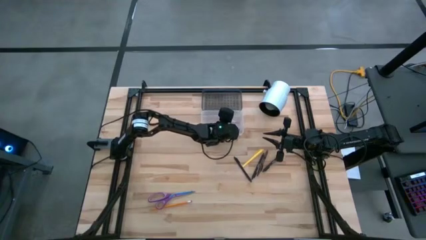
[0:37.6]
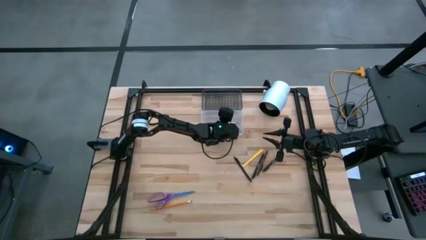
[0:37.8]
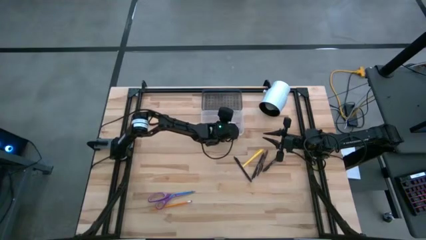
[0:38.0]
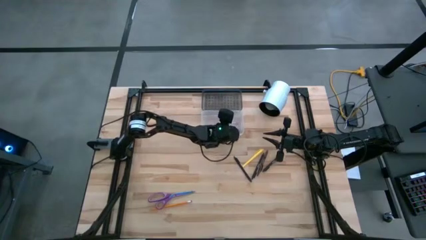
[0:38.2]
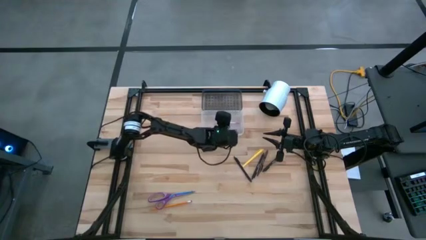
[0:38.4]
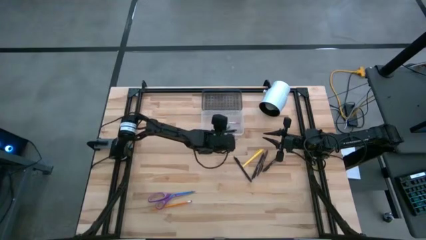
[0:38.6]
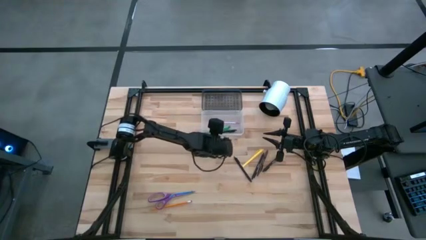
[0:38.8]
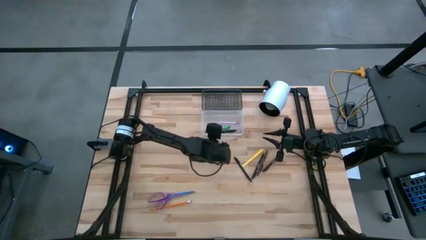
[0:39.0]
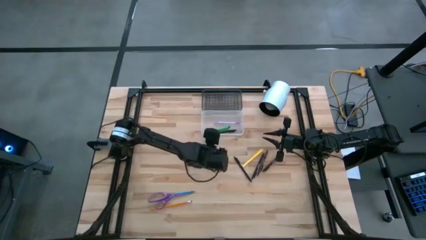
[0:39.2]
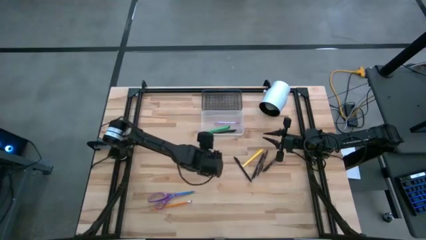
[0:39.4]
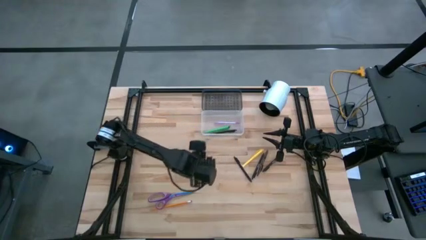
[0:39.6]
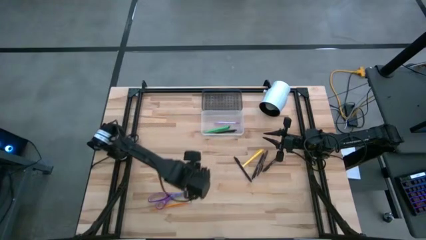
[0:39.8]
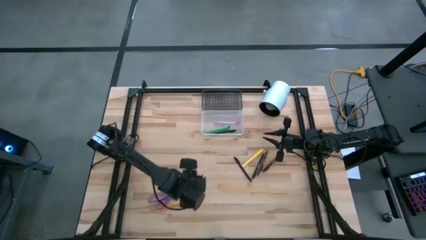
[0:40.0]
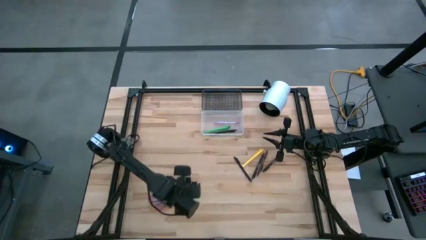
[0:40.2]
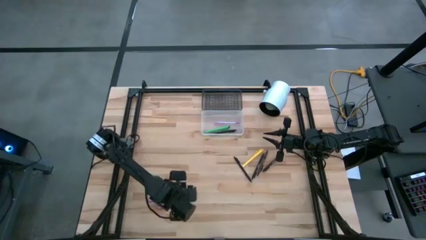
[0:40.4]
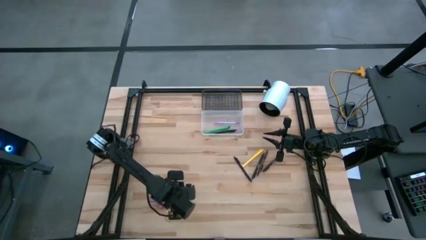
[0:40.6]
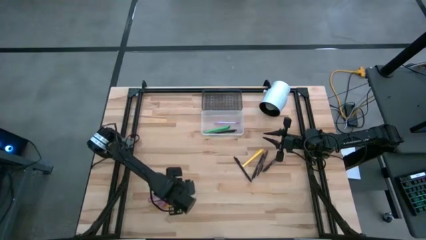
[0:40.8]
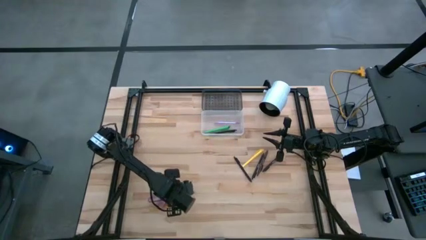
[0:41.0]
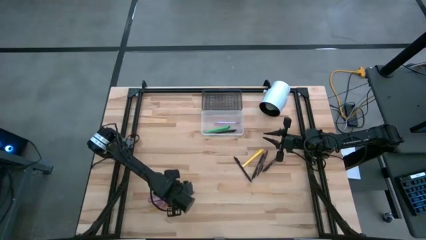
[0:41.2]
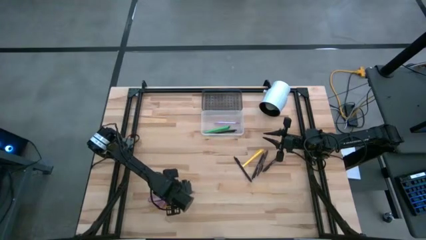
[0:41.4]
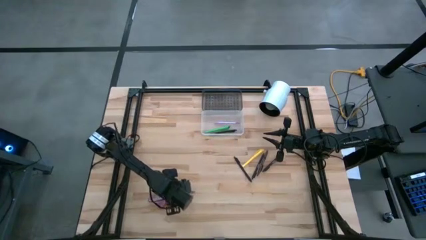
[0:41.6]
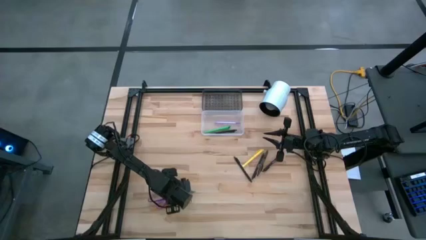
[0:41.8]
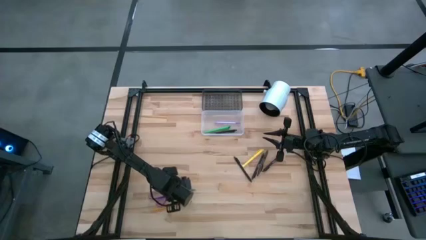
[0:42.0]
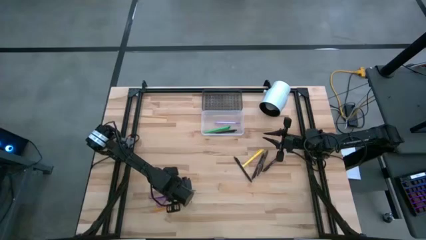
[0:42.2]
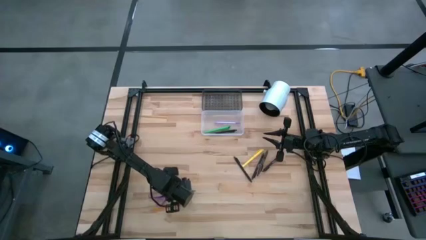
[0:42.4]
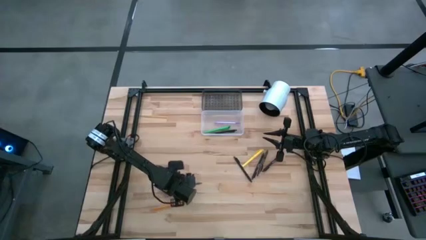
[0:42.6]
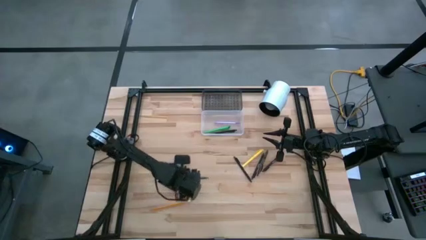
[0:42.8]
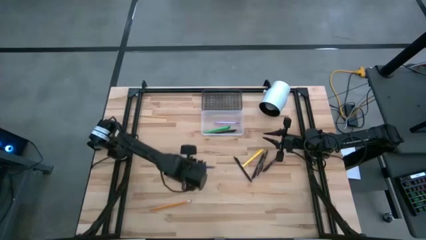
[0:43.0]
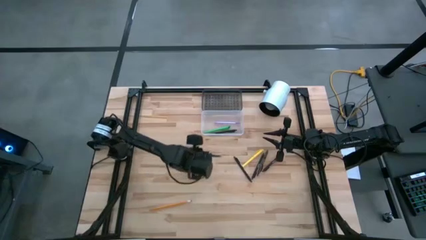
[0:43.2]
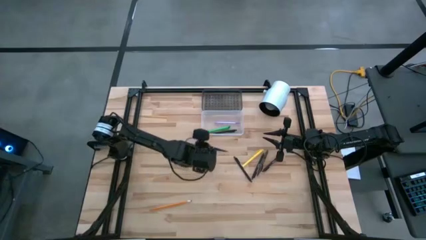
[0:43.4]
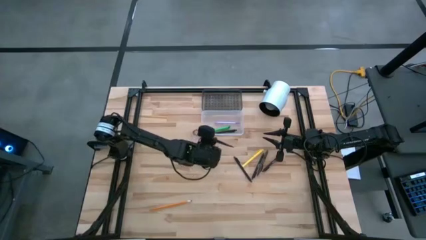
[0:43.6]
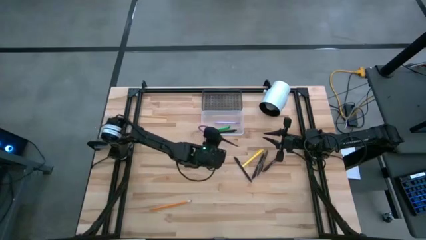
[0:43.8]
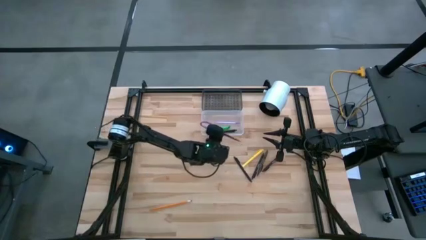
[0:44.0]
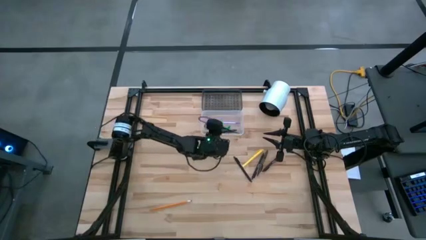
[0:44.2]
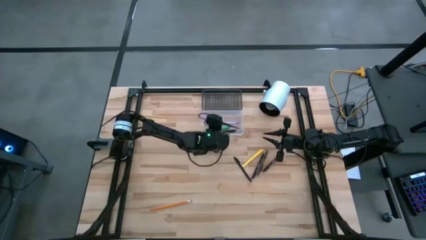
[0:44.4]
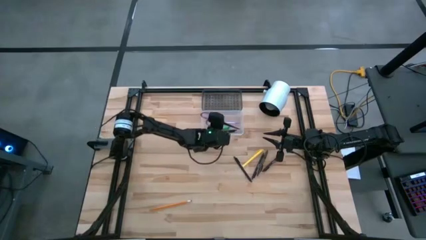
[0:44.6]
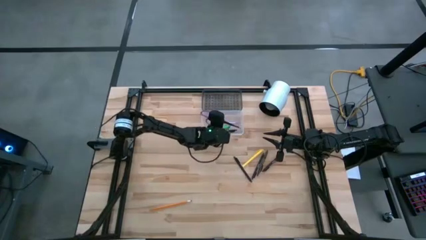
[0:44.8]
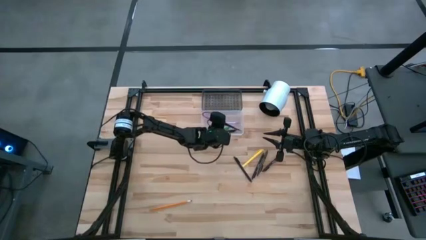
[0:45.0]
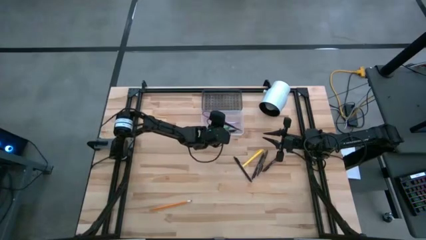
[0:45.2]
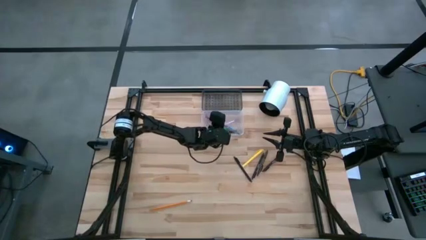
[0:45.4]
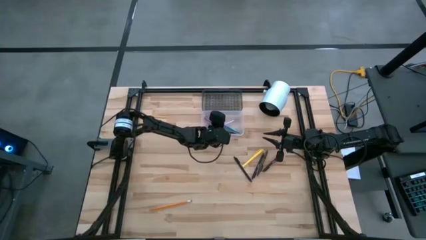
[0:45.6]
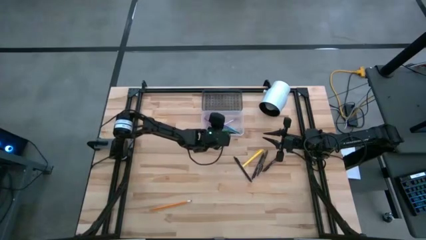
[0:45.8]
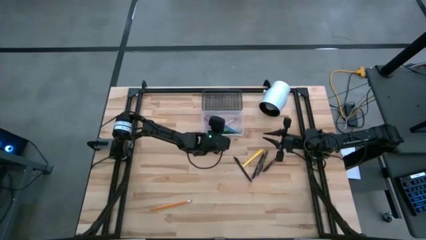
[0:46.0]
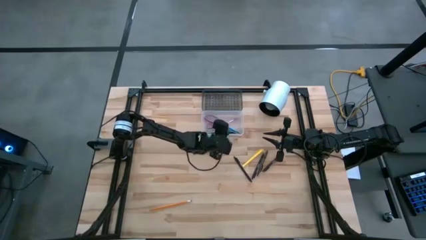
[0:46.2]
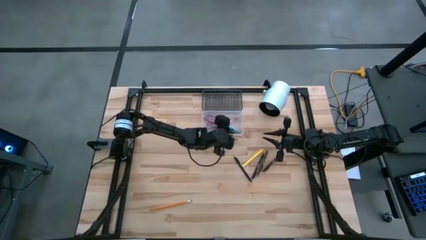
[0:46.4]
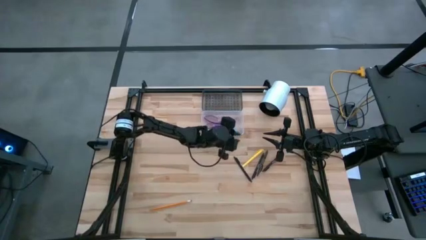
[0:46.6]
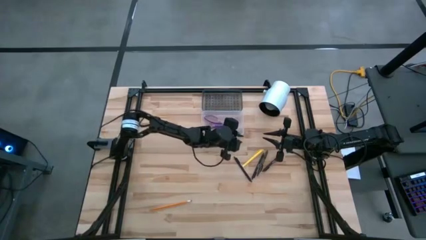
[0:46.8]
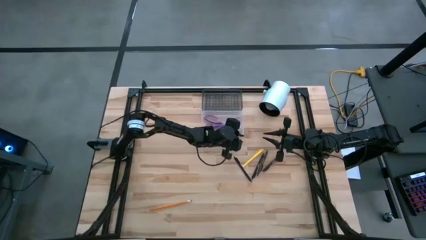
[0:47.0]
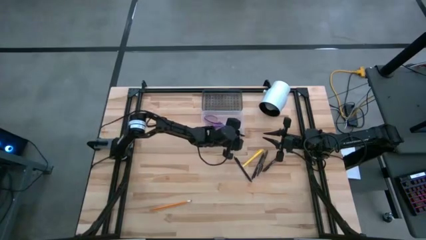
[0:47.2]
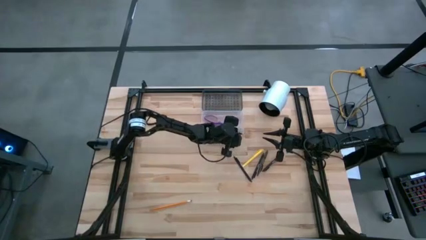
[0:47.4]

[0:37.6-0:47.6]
Task: Pick & place school supplies into a supply box
Put the purple scissors into the black box

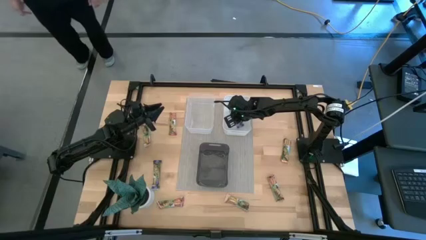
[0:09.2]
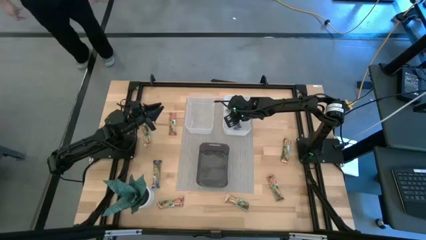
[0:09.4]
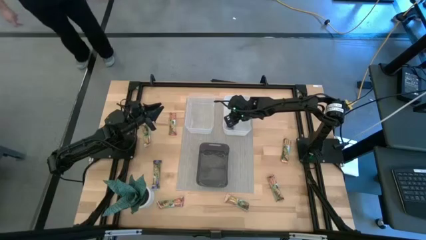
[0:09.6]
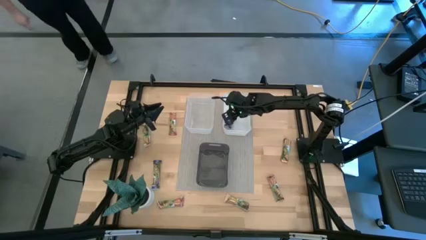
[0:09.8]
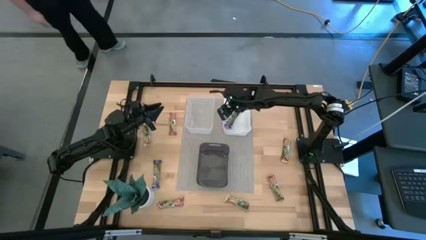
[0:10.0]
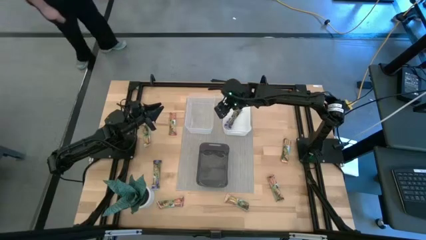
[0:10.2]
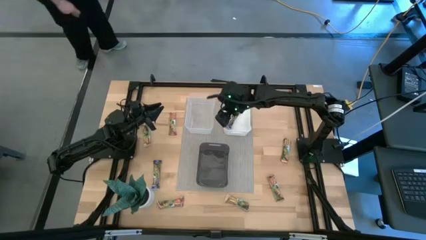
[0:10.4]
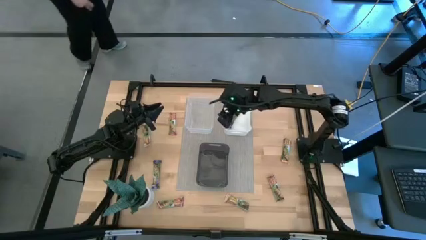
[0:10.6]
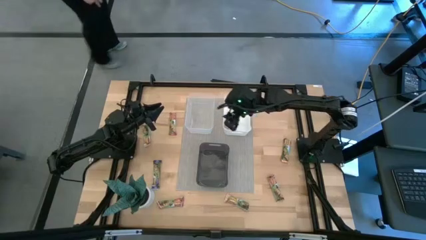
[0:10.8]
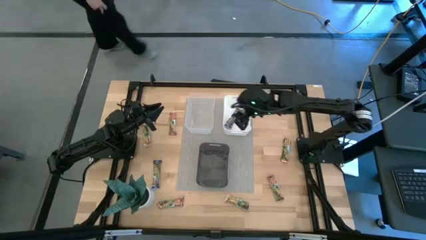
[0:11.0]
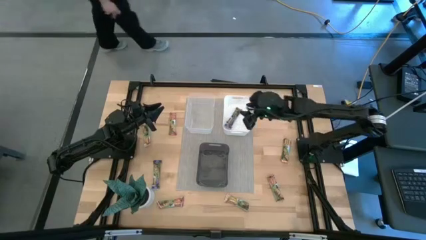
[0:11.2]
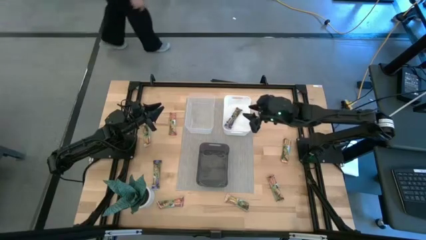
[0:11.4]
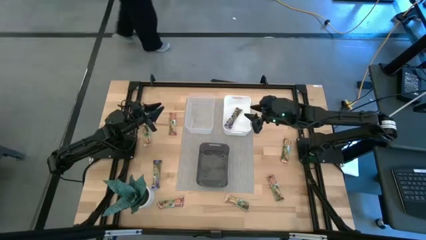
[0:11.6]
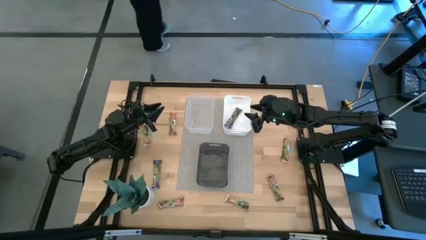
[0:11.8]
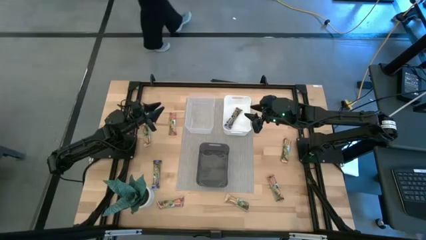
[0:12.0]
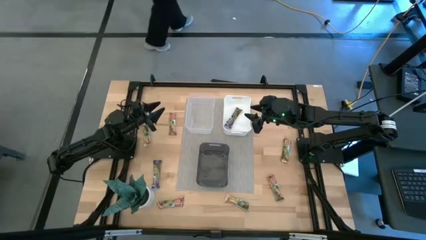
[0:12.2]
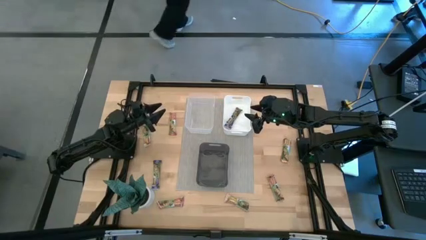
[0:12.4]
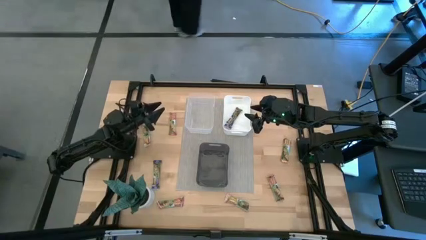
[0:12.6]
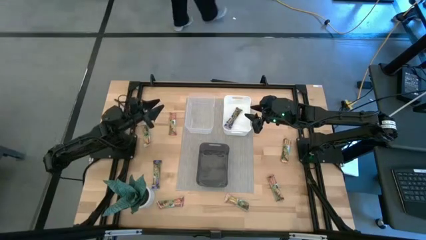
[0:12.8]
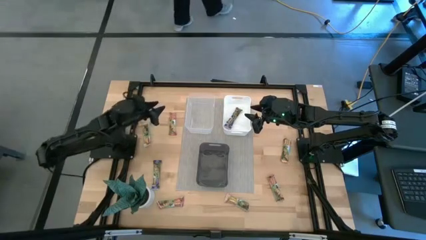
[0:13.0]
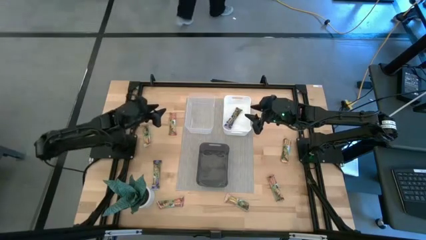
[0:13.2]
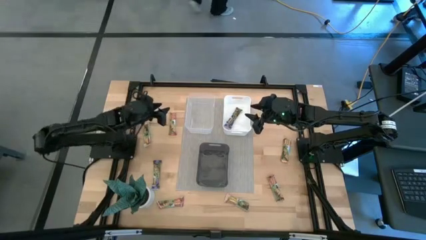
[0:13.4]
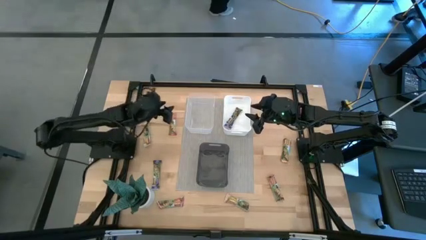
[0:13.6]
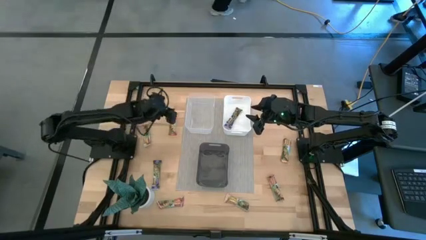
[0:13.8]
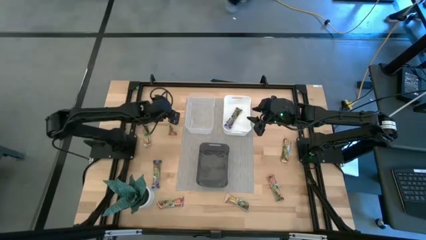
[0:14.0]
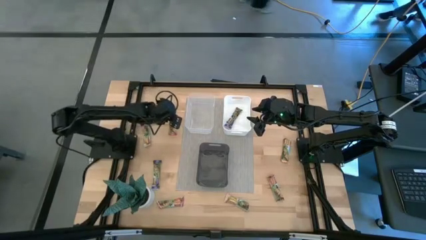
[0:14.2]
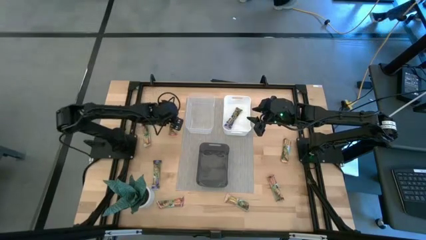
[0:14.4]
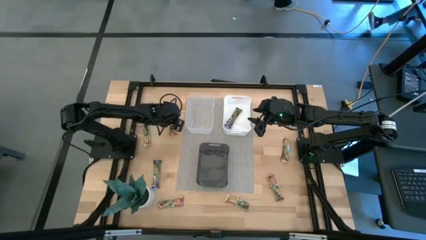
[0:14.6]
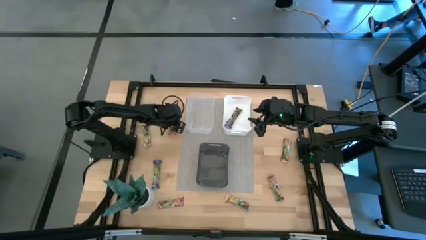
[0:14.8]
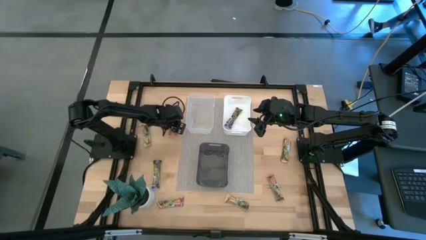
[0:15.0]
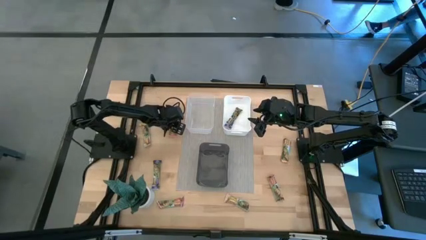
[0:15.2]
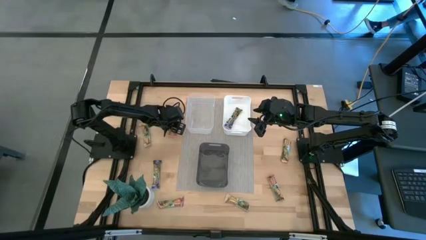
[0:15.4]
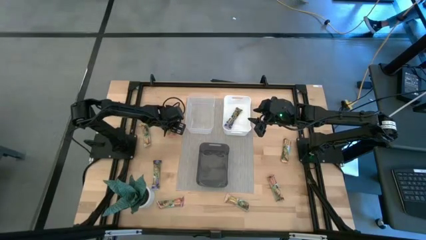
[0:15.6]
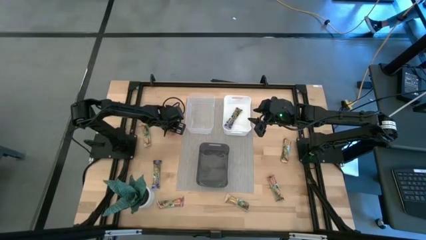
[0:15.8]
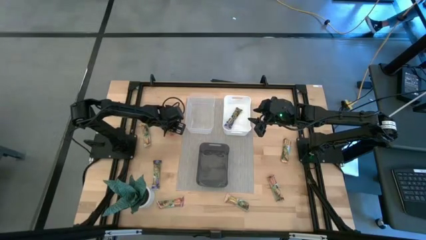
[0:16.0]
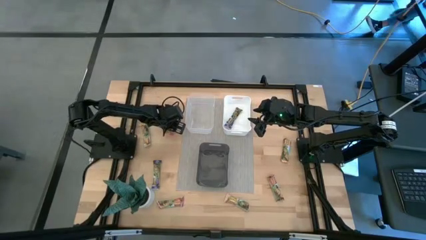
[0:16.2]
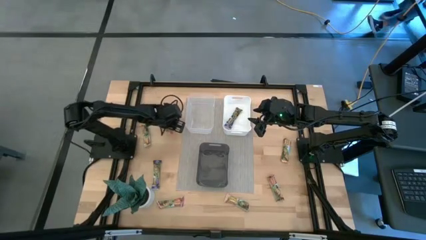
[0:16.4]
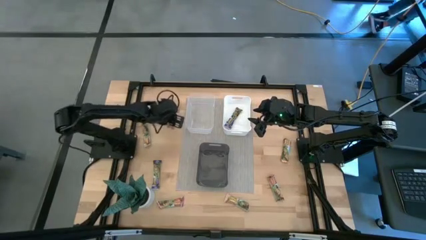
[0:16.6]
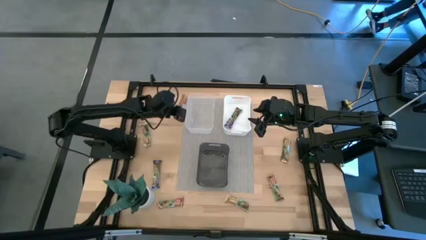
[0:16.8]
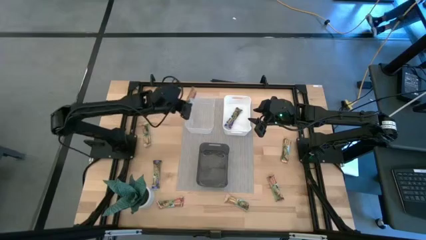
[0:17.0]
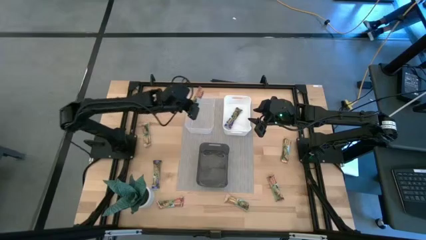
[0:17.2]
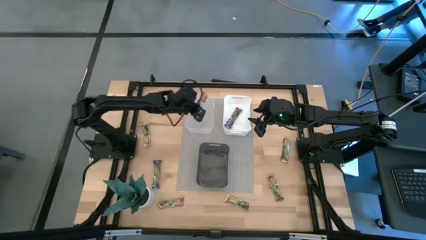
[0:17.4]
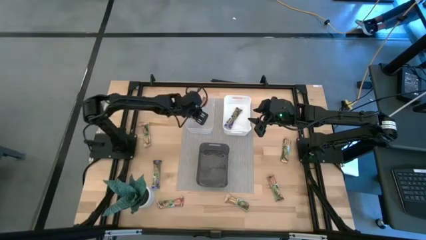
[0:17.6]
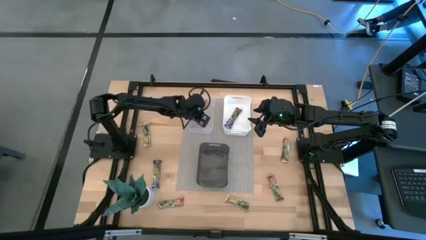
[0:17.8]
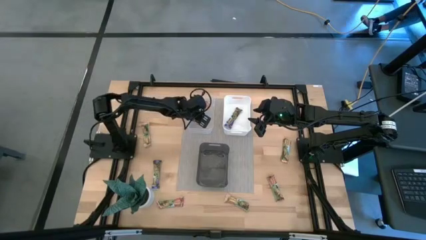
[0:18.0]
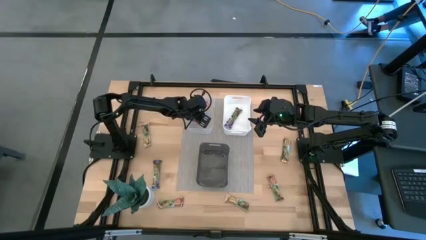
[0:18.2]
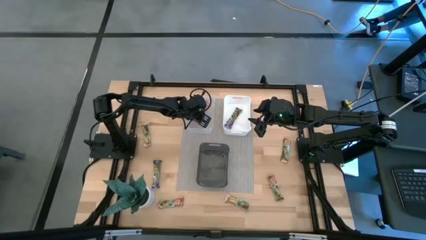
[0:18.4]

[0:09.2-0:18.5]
Task: Pick and place Granola Bars by type
Put the top left red granola bar into the transparent bin
